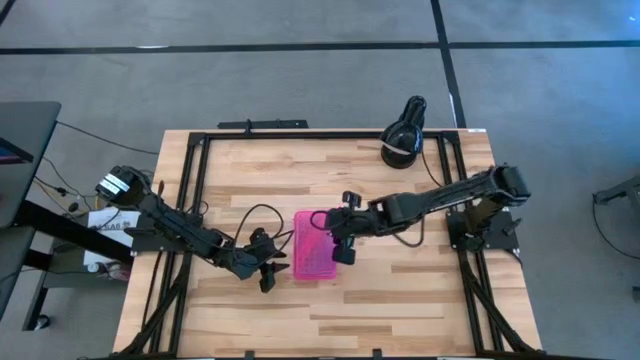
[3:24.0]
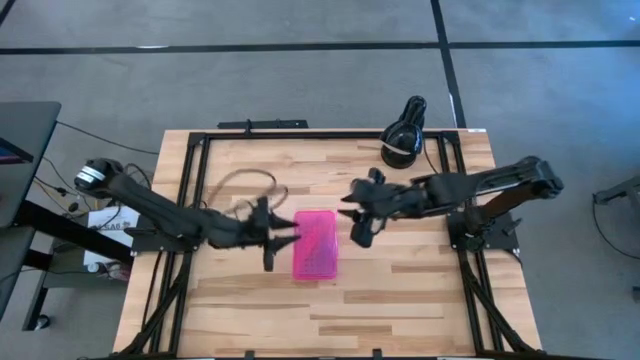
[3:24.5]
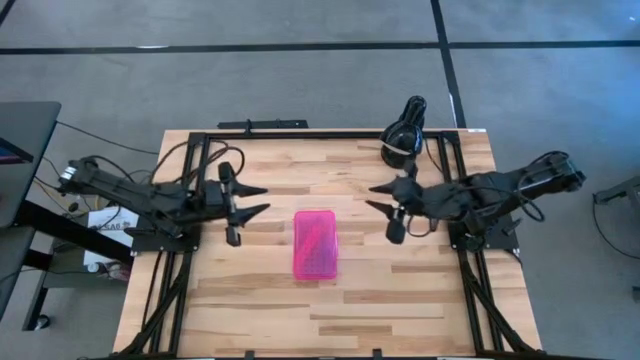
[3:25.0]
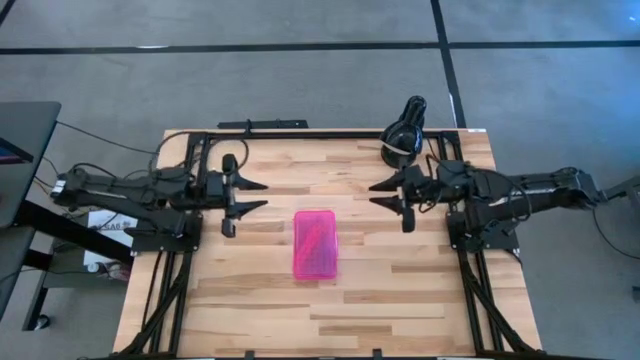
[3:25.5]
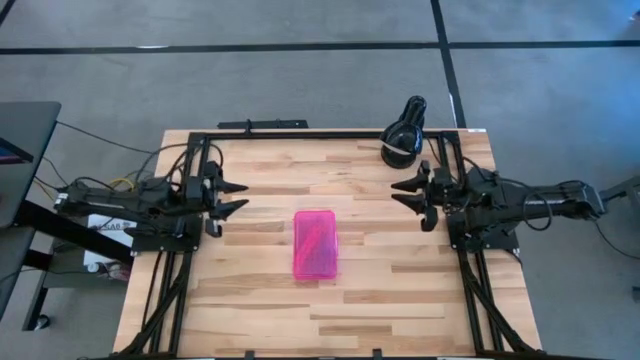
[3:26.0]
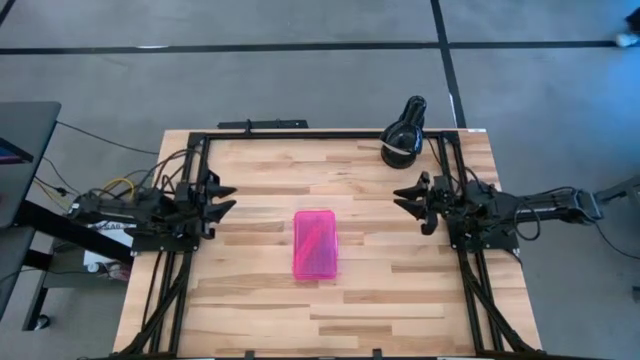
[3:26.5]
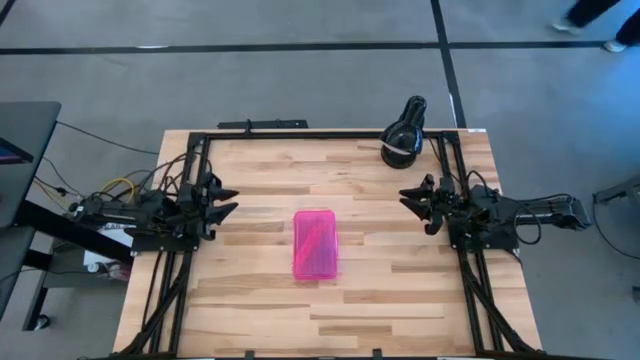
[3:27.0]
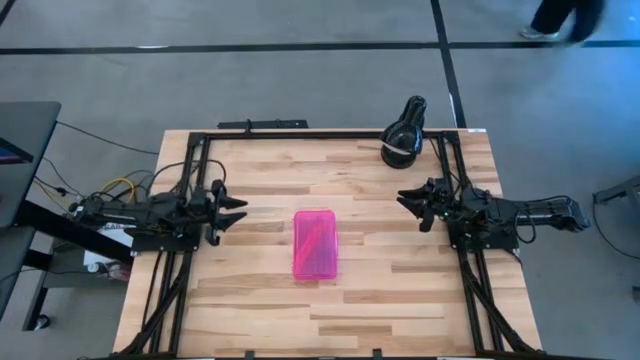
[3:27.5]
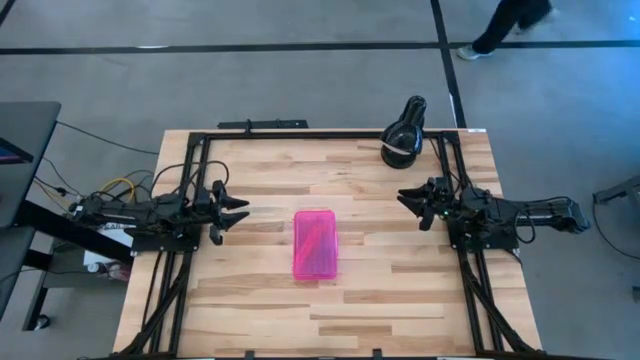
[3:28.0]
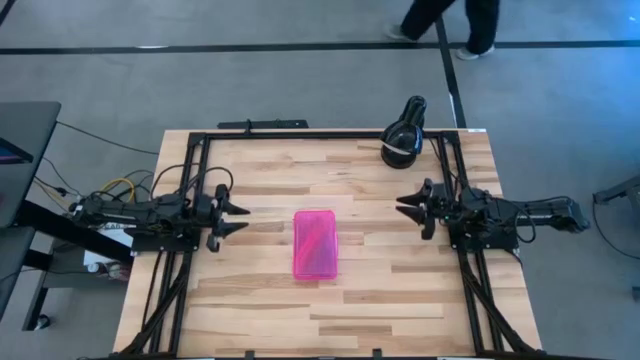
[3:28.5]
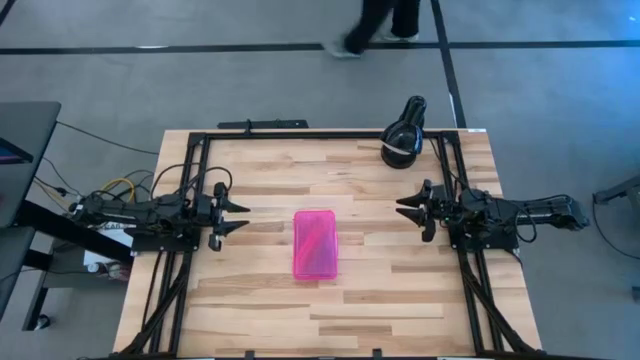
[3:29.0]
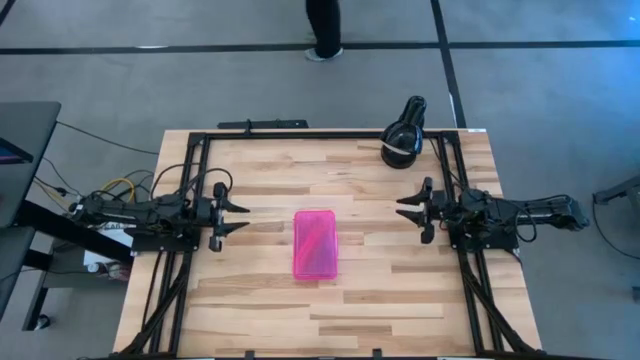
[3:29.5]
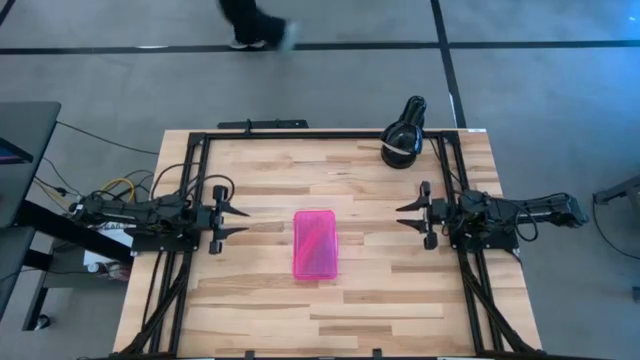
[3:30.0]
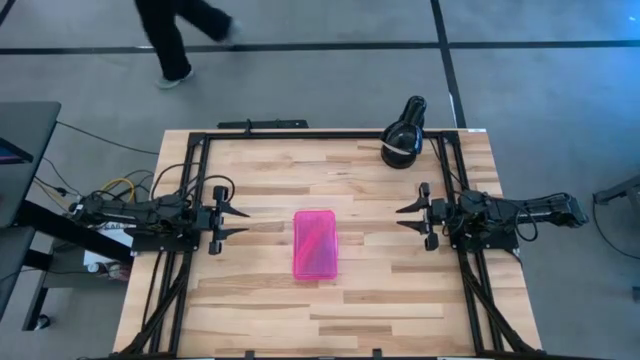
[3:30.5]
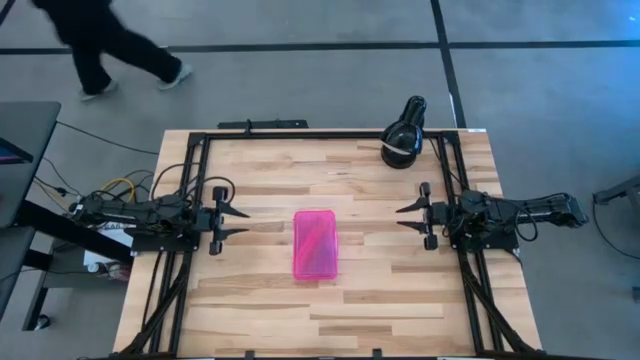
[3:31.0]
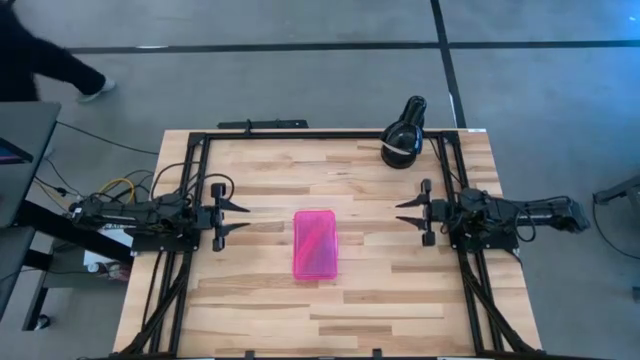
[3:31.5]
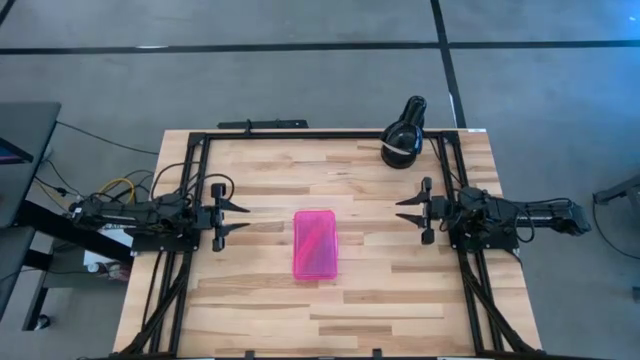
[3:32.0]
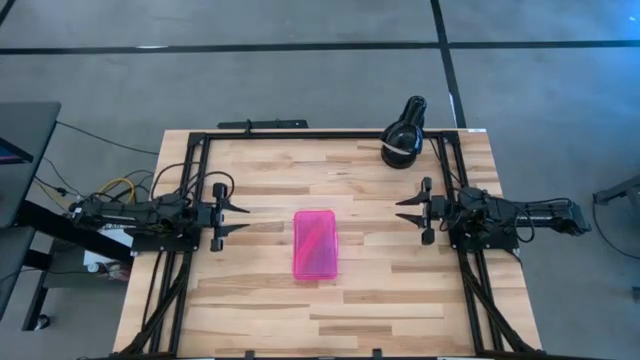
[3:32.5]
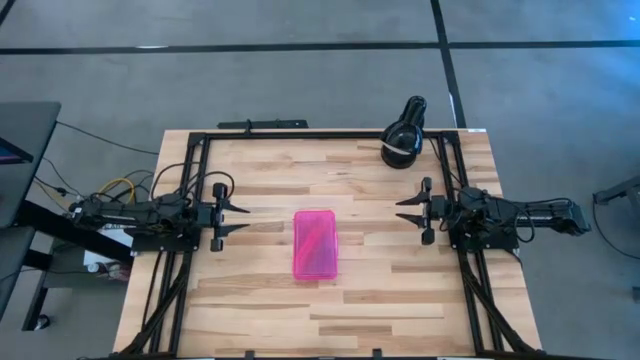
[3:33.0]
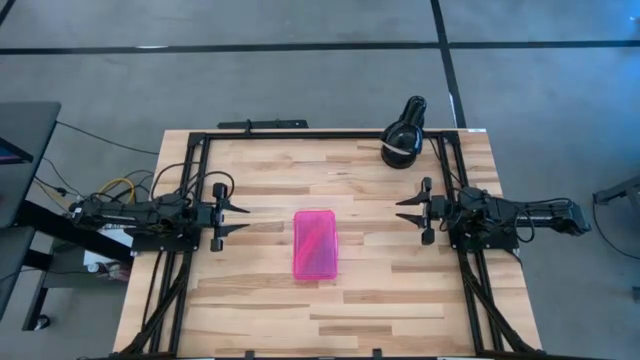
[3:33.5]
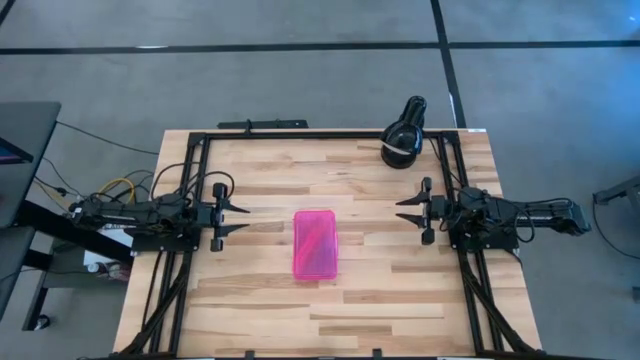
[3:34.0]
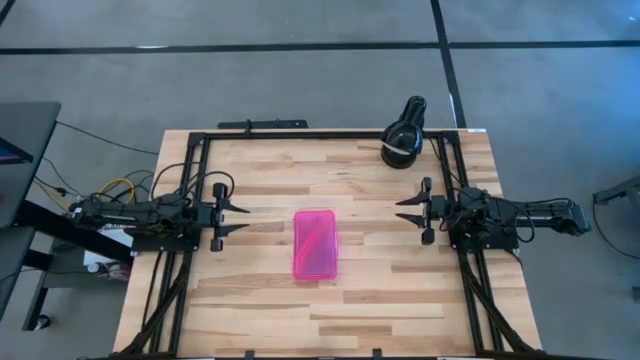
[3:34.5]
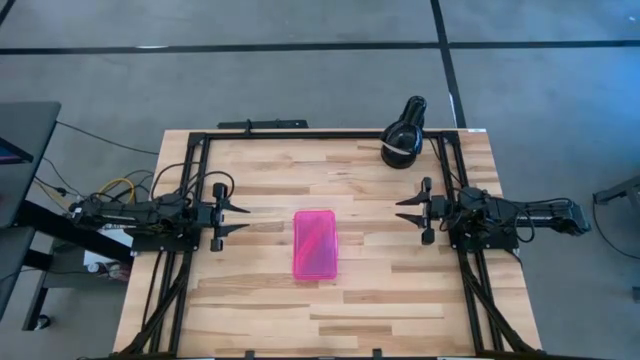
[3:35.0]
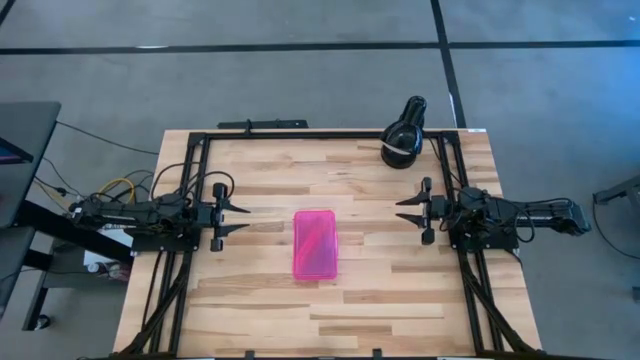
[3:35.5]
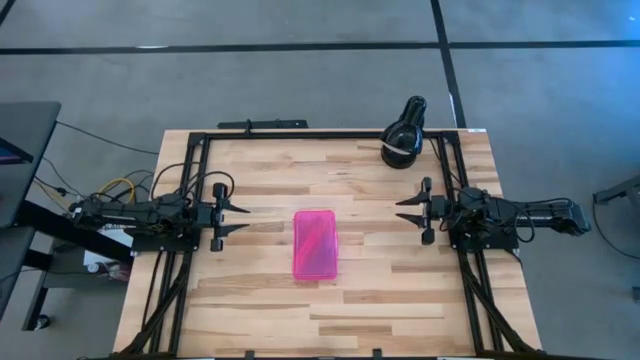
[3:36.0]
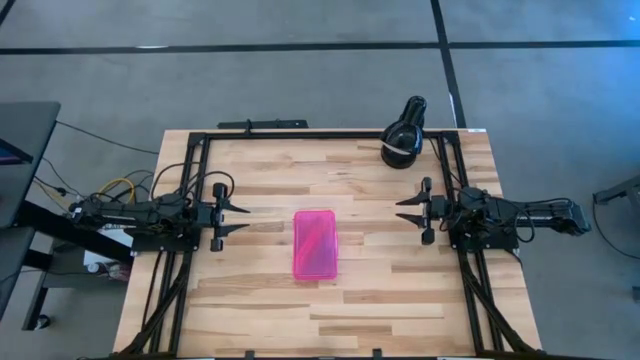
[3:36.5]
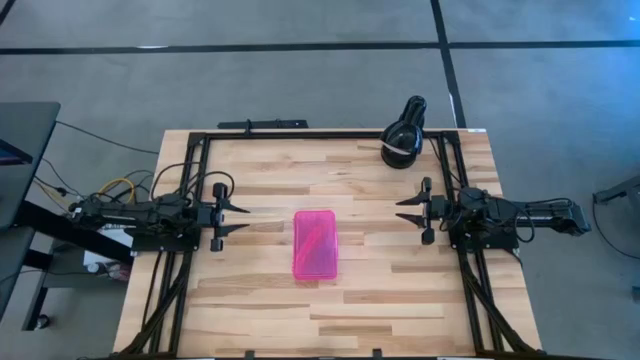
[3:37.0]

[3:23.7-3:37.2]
Task: Pick & place school supplies into a supply box
Return to Home Position

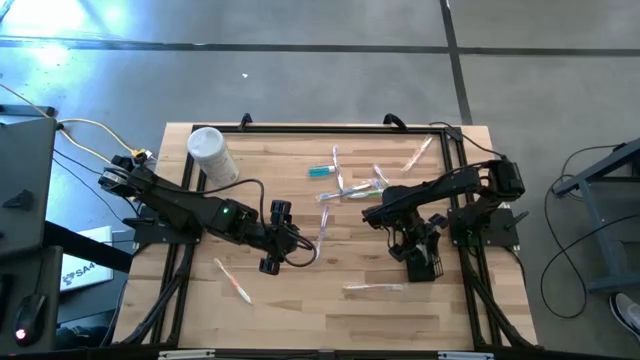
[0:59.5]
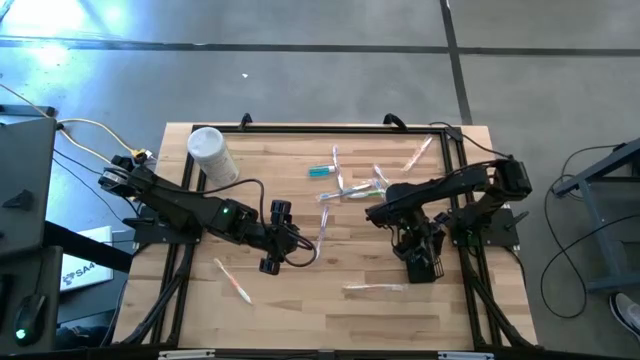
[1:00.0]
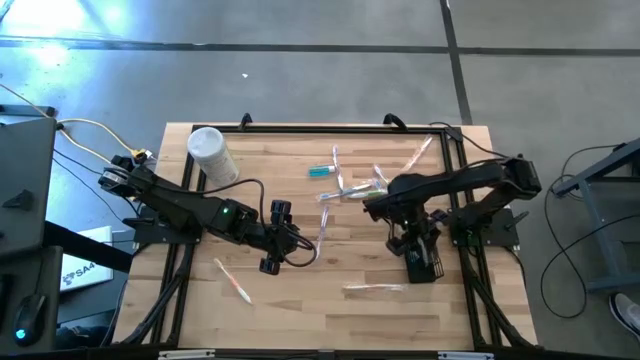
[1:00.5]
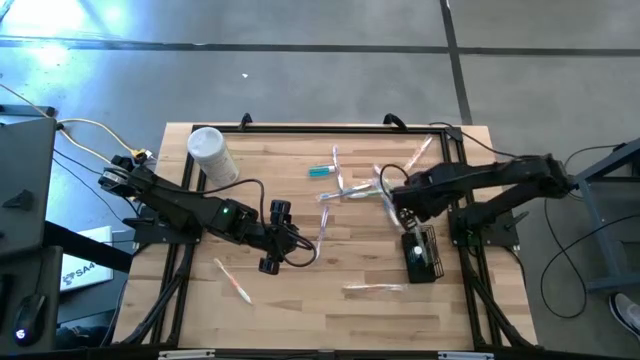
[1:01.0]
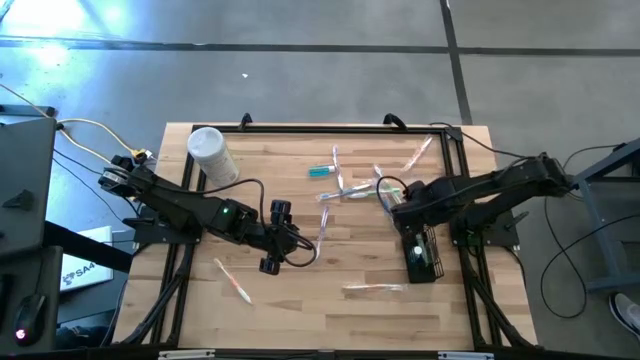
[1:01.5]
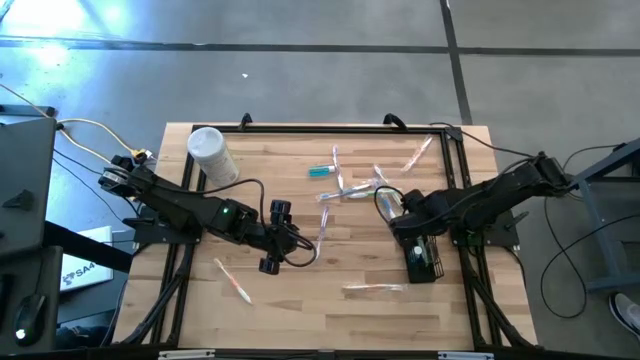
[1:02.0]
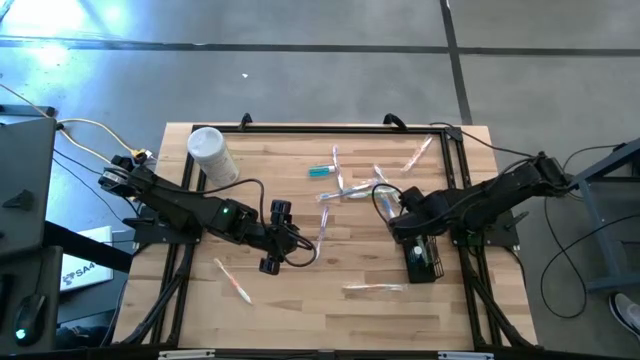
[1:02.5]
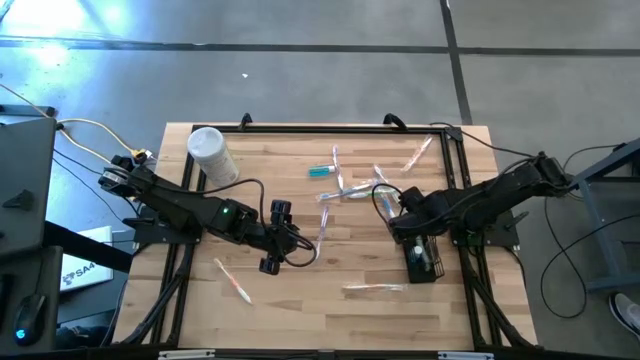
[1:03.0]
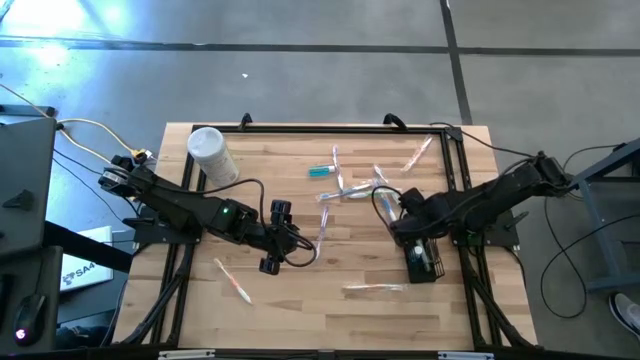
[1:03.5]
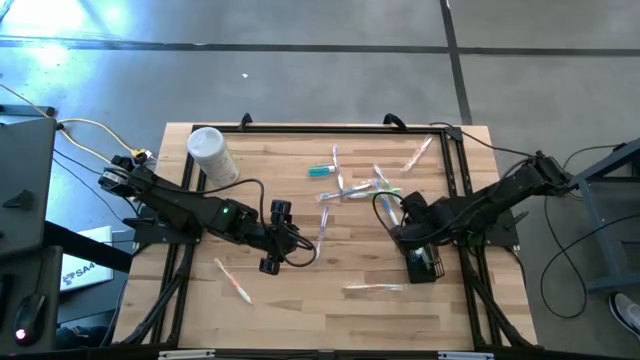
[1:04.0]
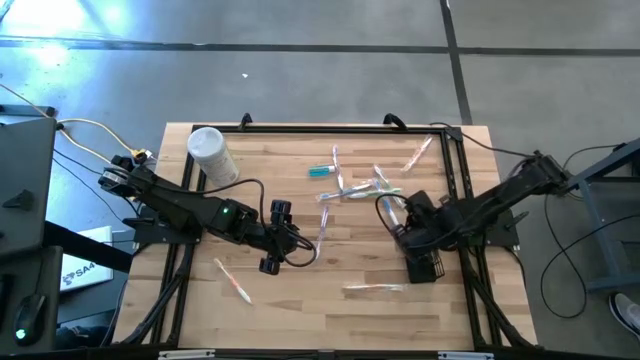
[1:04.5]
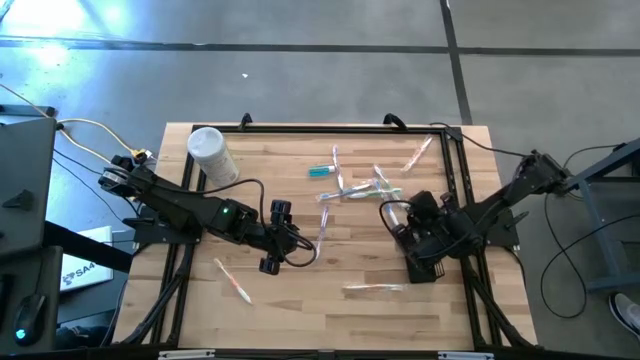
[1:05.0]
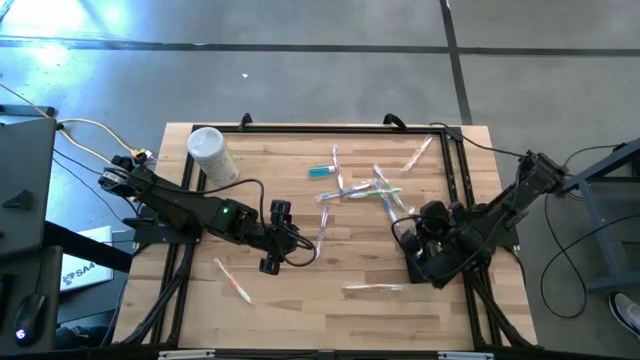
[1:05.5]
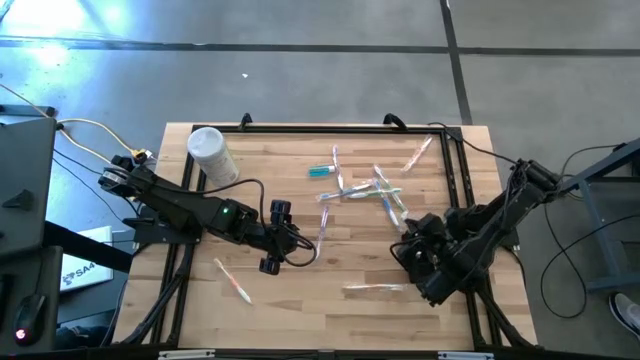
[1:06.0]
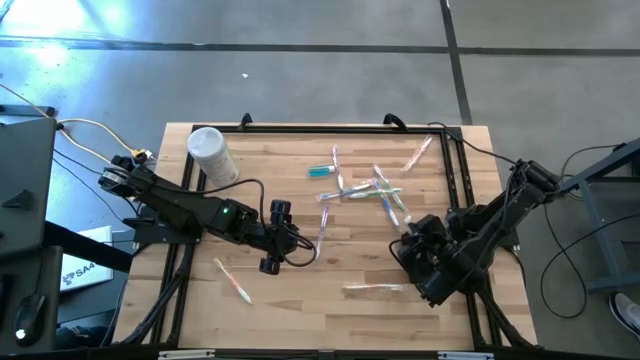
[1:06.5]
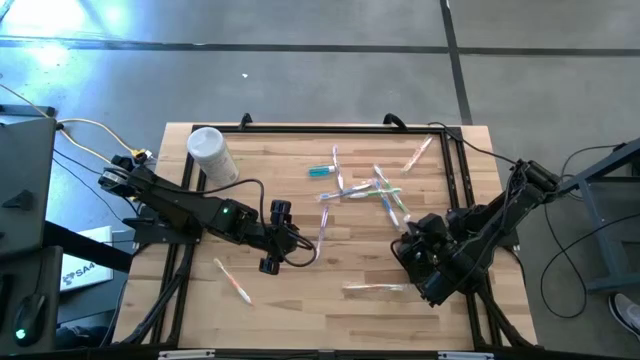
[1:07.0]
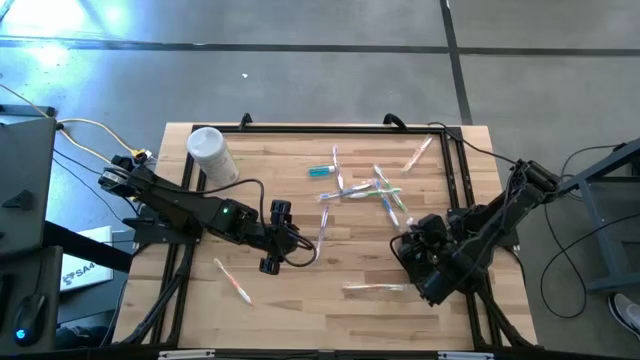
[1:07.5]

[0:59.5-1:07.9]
Task: Pick & Place toothbrushing station
Adjust the green toothbrush in the black mesh organizer
